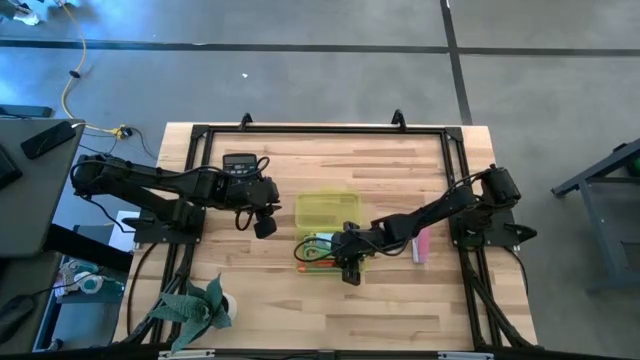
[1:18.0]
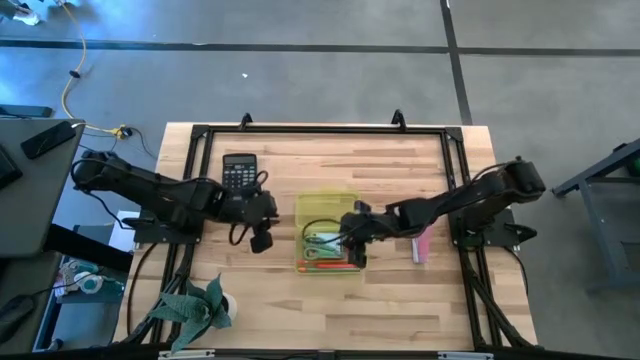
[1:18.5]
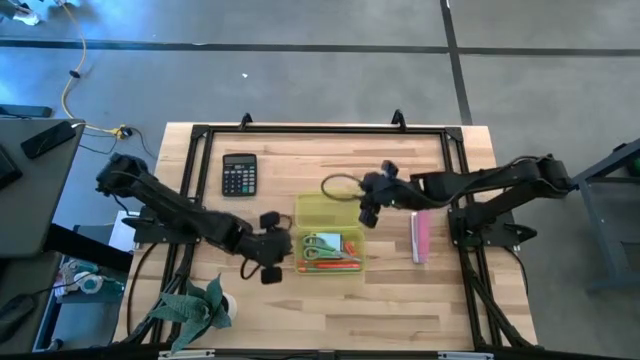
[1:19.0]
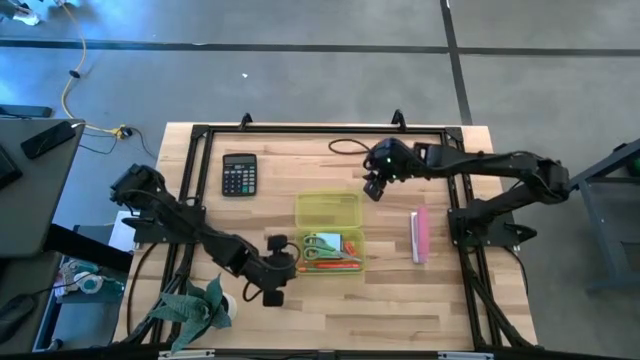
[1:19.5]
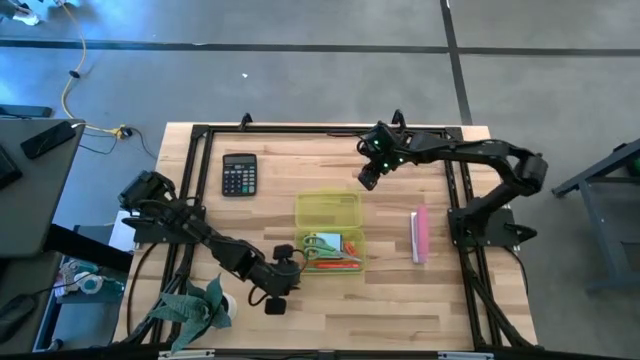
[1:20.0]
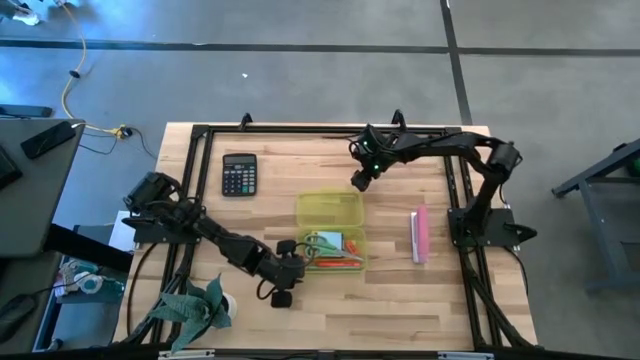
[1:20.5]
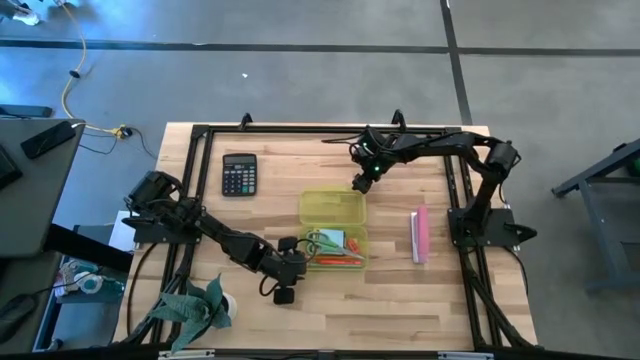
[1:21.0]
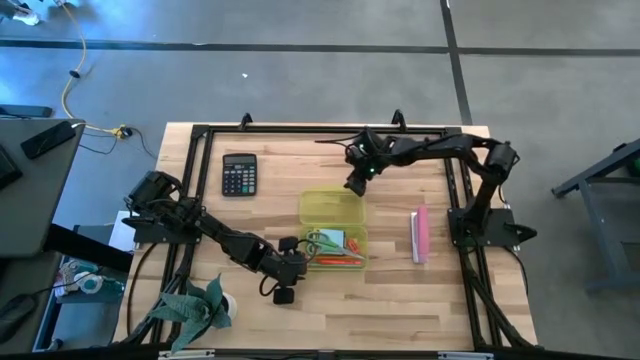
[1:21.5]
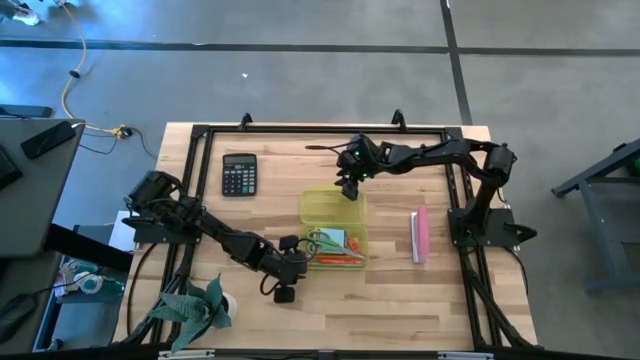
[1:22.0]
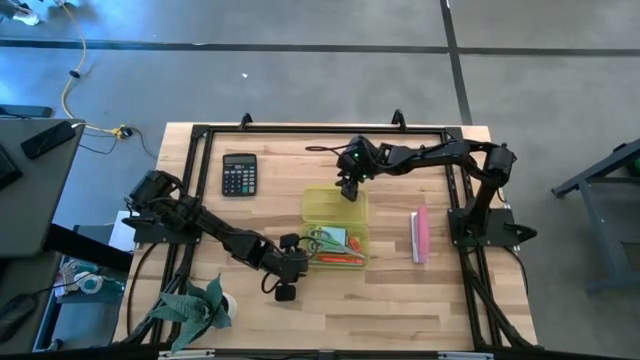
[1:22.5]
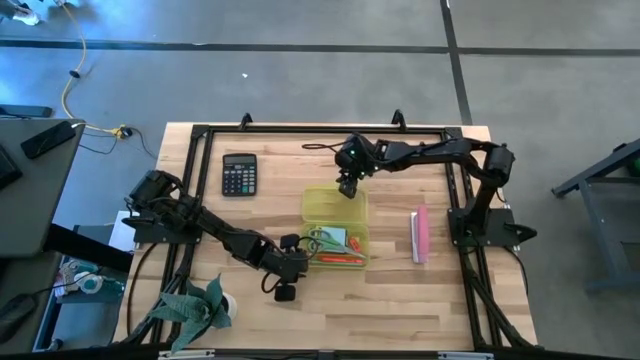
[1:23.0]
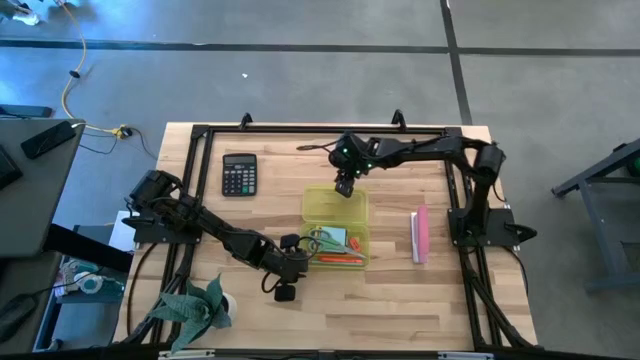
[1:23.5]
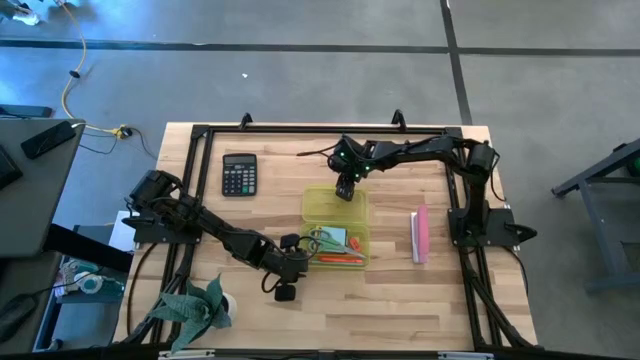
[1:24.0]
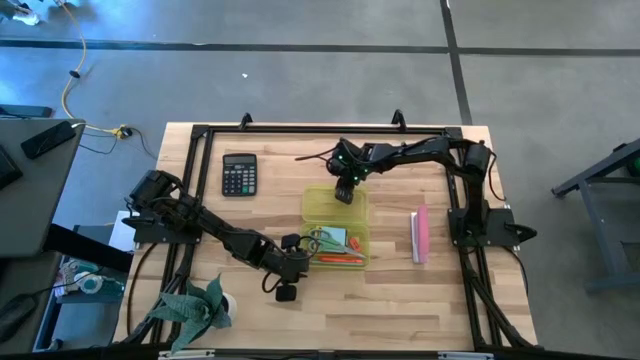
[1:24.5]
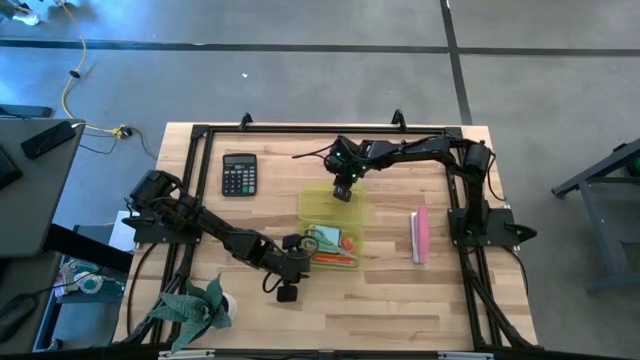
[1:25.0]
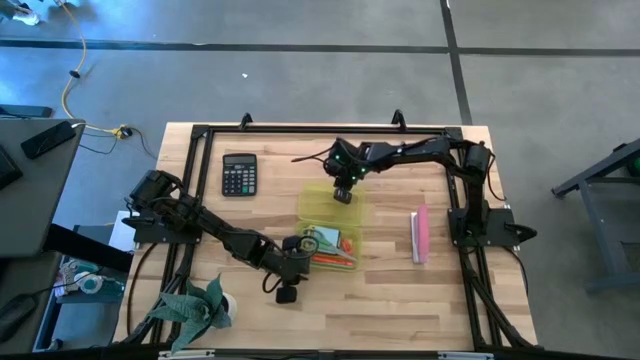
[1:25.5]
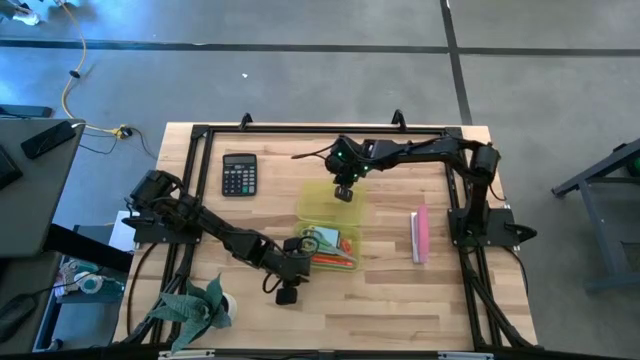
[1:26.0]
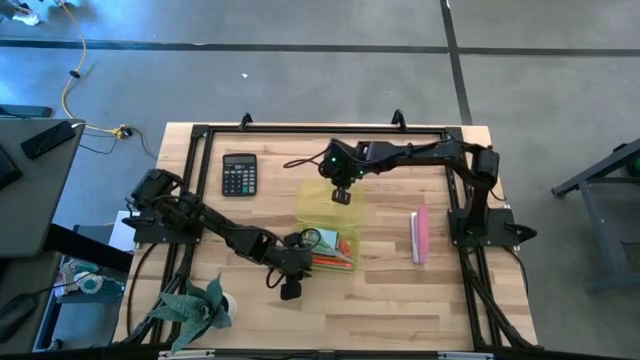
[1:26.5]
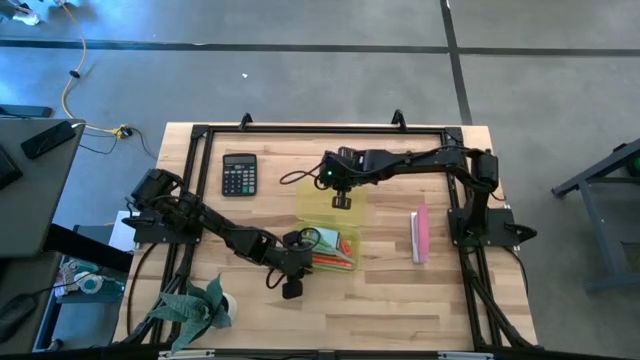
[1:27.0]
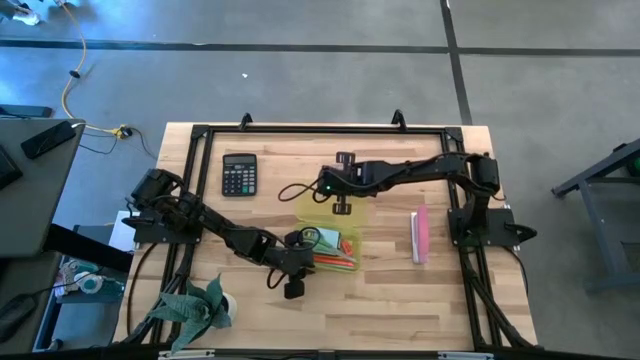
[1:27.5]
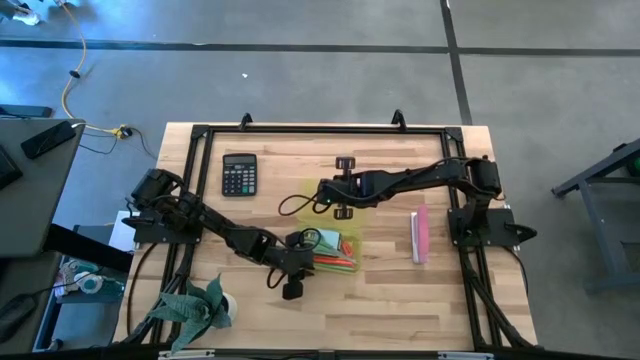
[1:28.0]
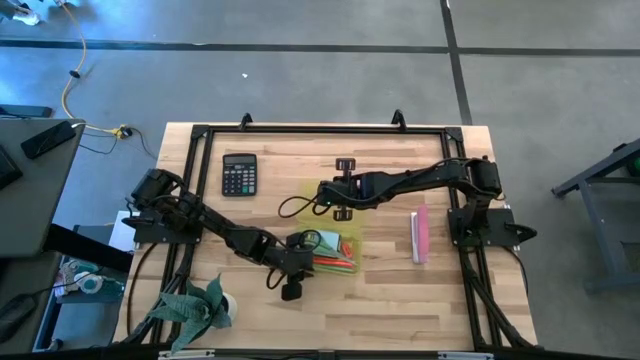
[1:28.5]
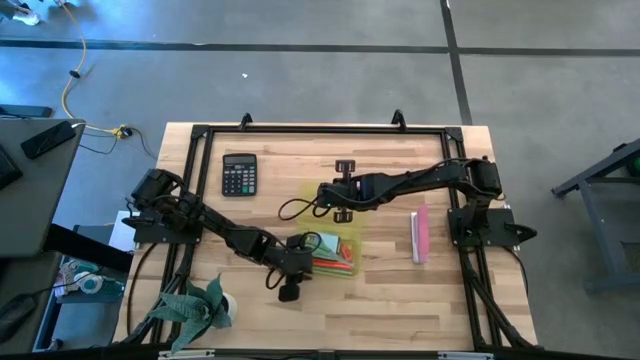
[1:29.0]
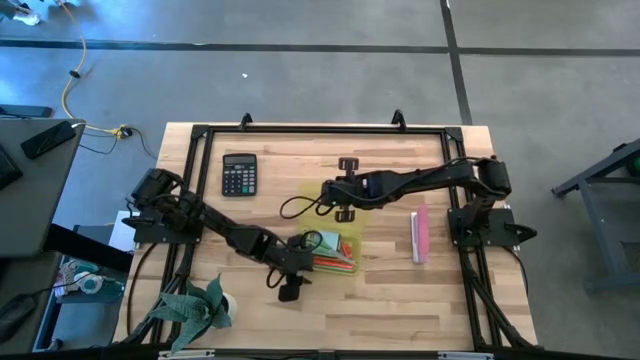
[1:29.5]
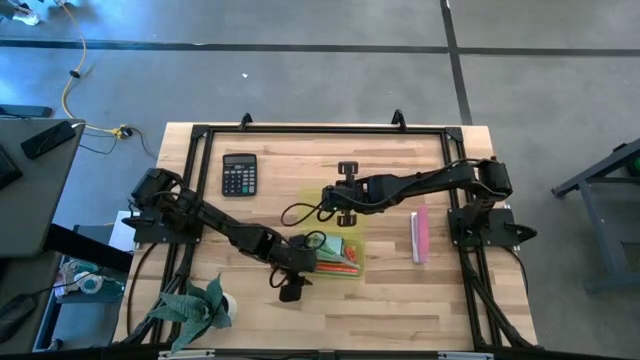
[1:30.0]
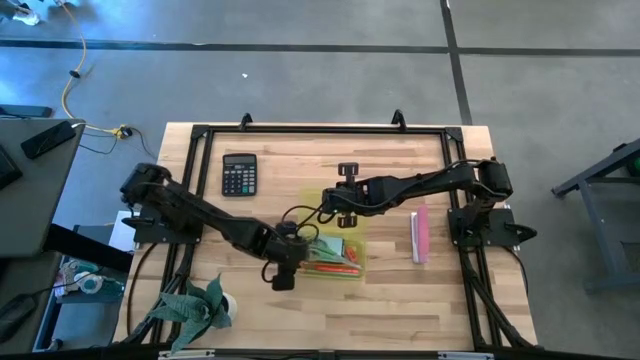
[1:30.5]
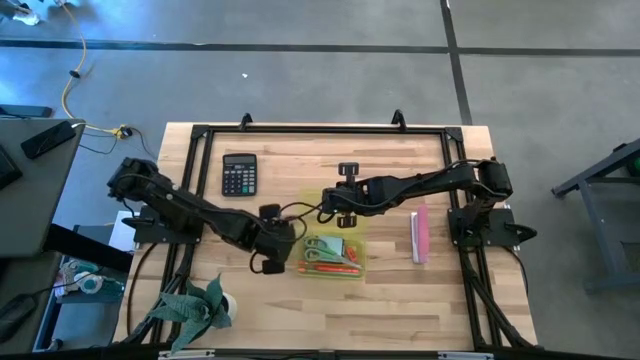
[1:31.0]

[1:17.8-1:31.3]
Task: Pack school essentials
Close the yellow supply box

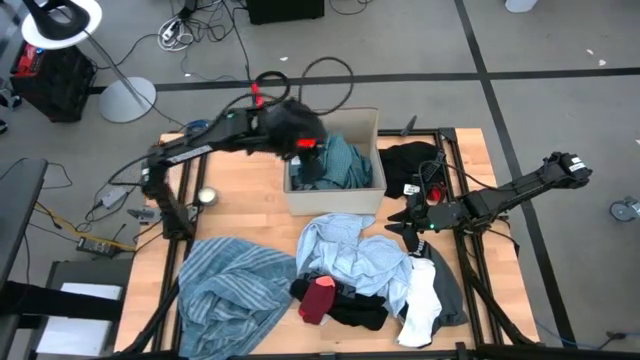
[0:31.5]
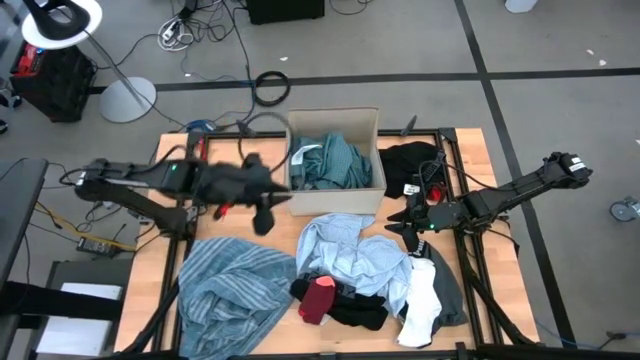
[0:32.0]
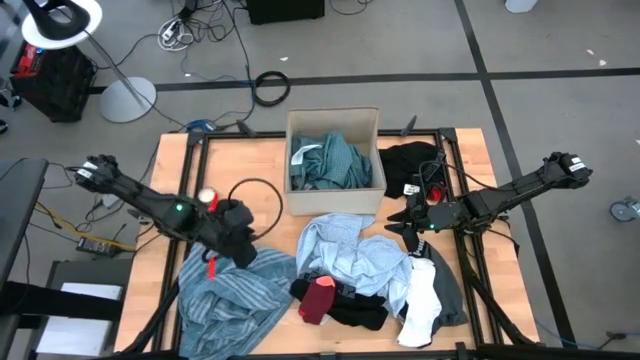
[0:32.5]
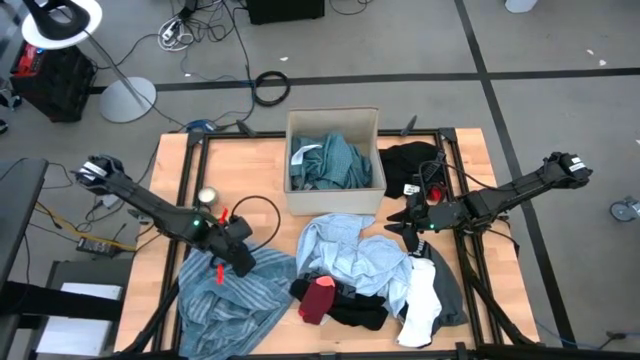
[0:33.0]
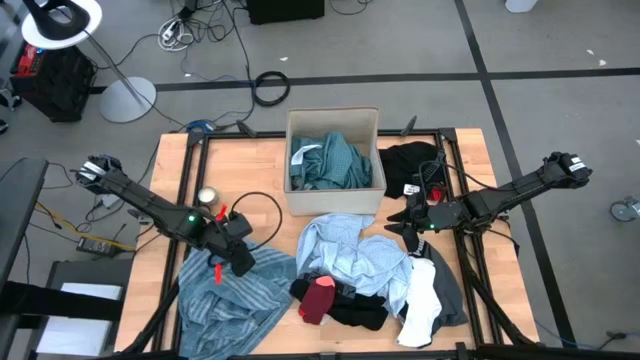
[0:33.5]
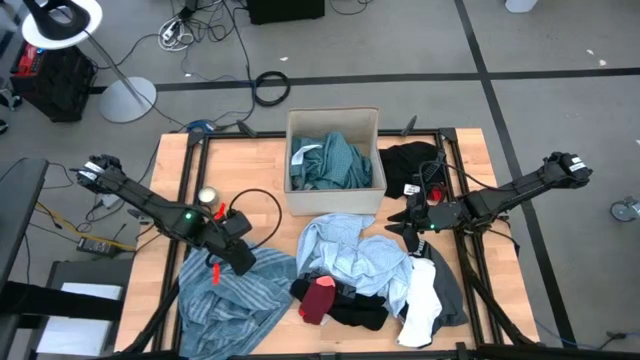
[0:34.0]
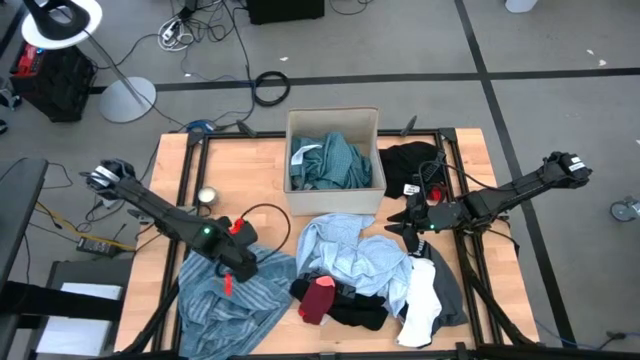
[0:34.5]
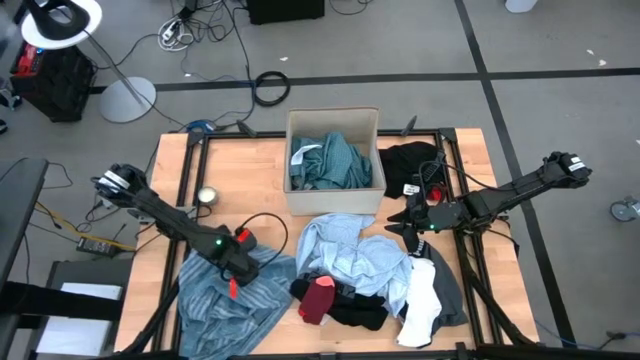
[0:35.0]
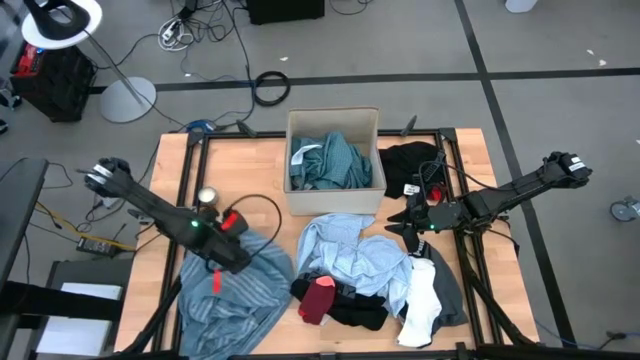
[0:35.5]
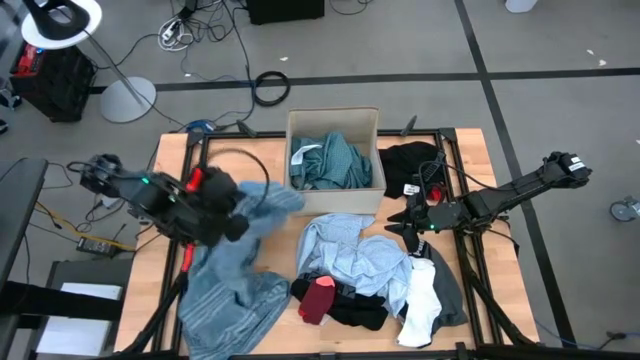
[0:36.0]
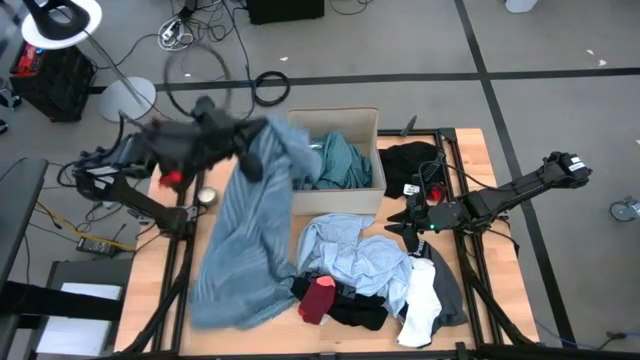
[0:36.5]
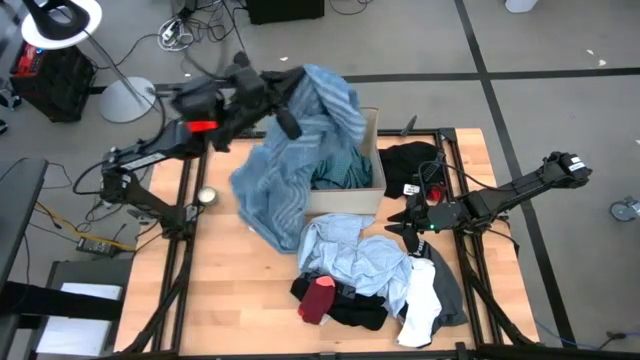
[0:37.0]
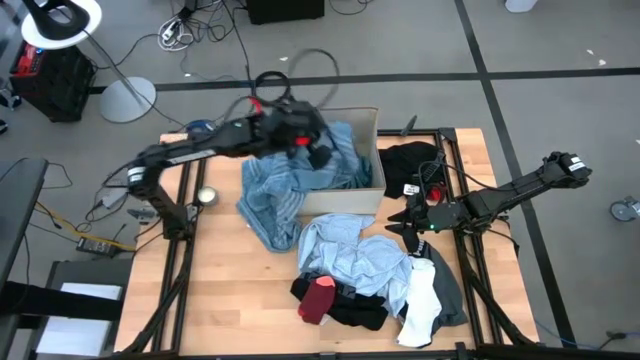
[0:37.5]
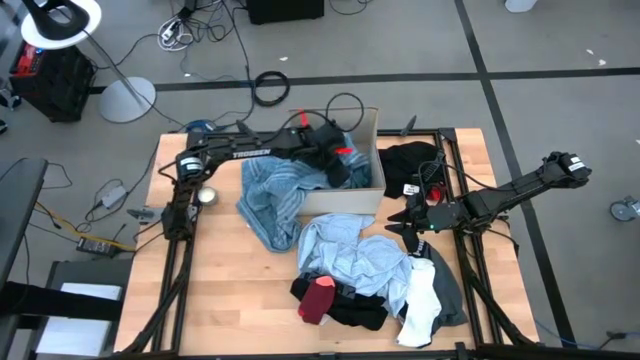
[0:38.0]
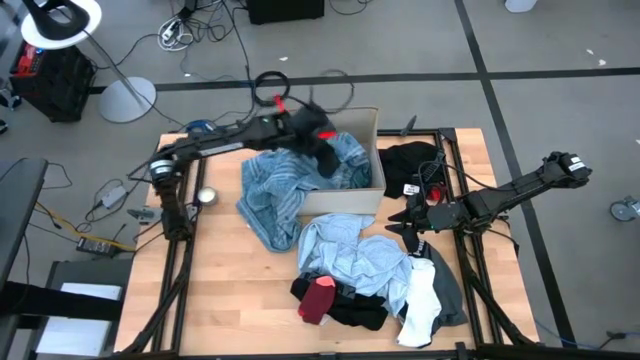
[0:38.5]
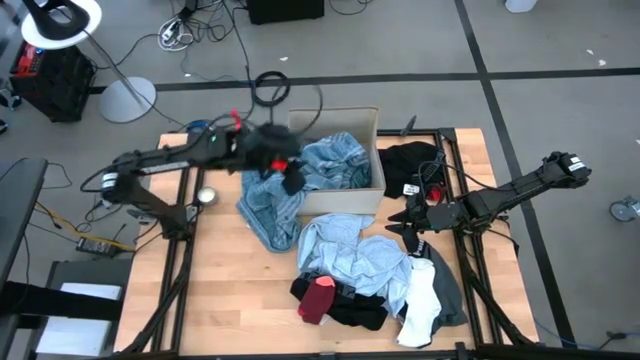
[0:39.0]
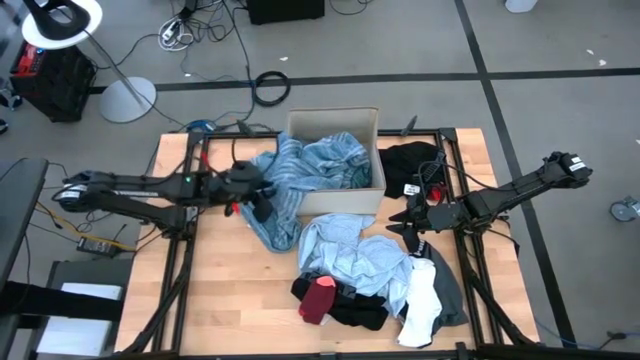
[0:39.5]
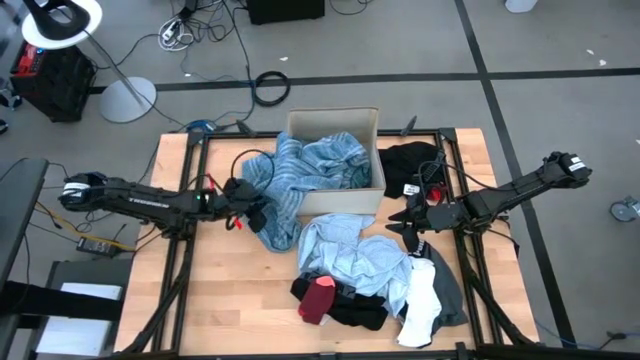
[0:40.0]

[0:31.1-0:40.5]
Task: Sort clothes
Put the blue towel into the white laundry bin
